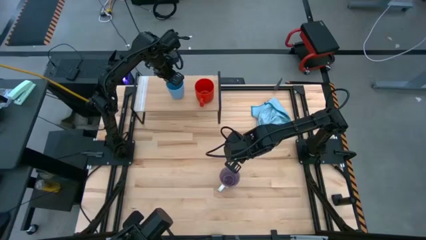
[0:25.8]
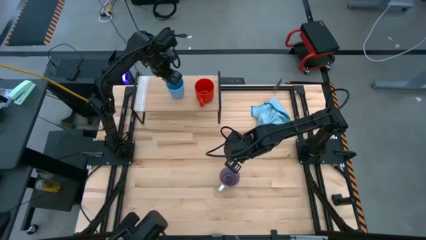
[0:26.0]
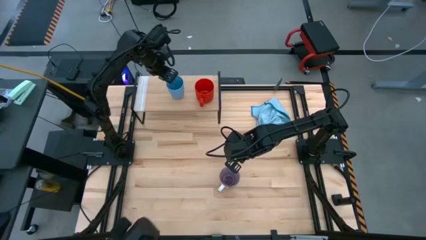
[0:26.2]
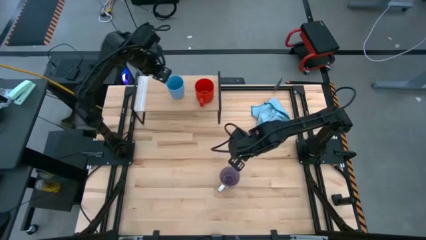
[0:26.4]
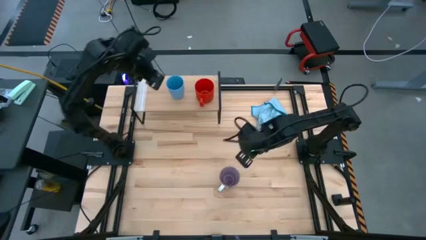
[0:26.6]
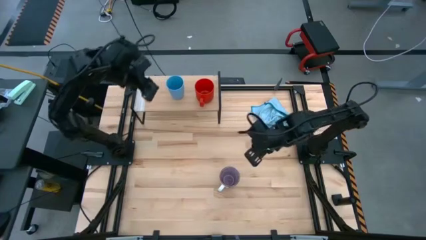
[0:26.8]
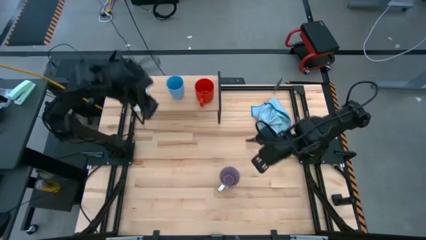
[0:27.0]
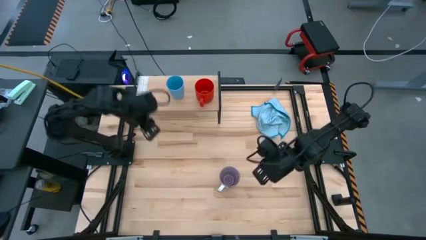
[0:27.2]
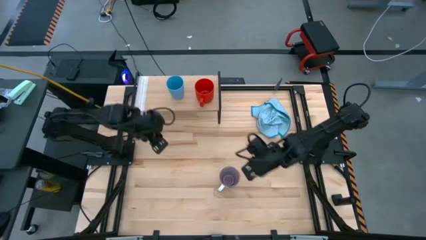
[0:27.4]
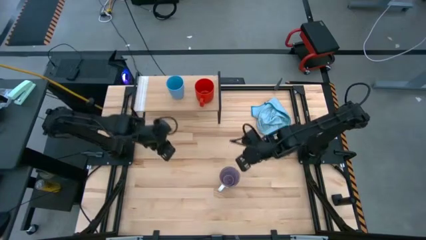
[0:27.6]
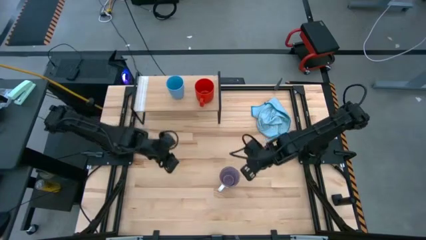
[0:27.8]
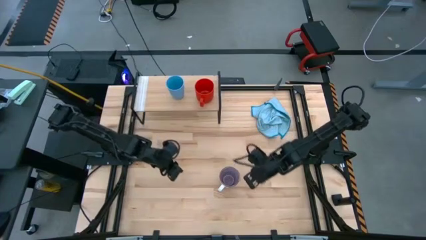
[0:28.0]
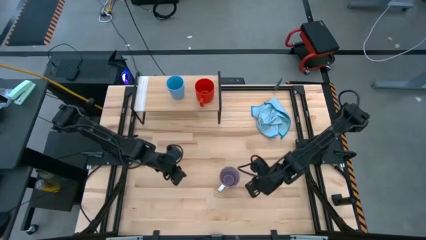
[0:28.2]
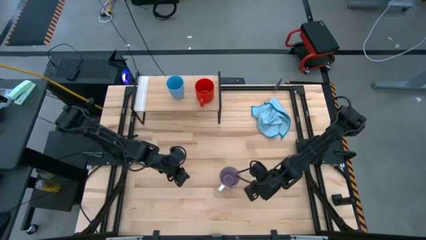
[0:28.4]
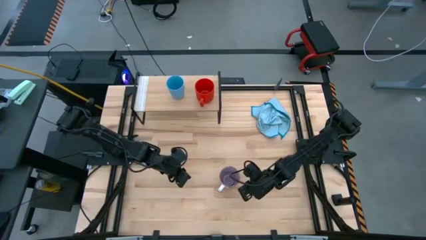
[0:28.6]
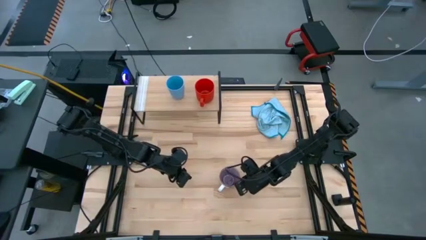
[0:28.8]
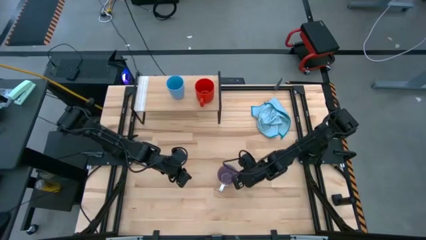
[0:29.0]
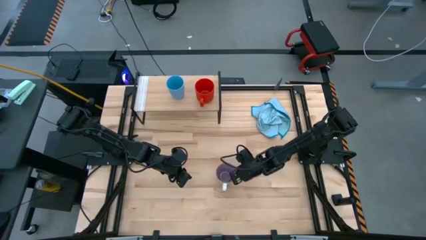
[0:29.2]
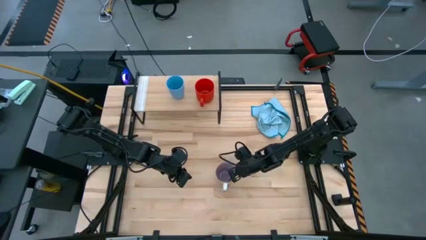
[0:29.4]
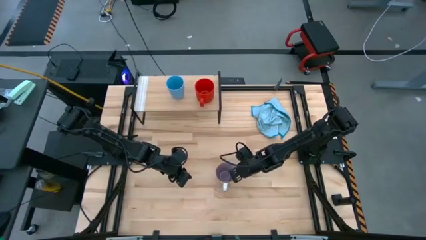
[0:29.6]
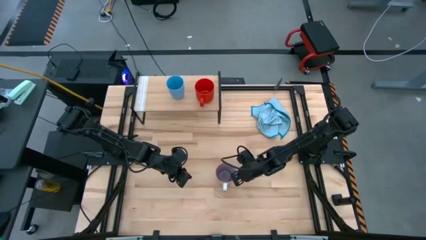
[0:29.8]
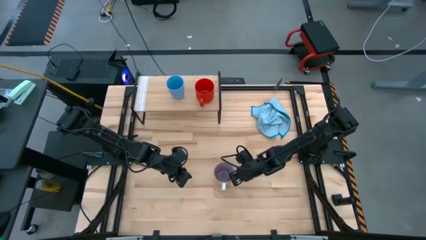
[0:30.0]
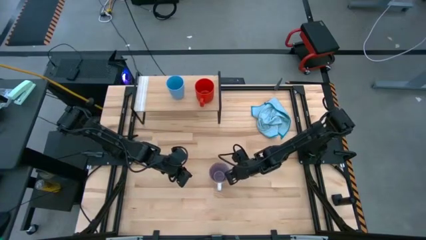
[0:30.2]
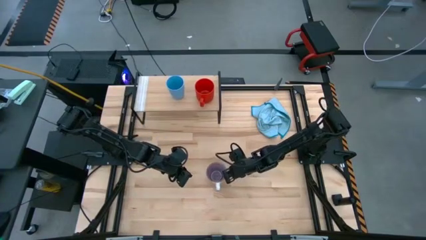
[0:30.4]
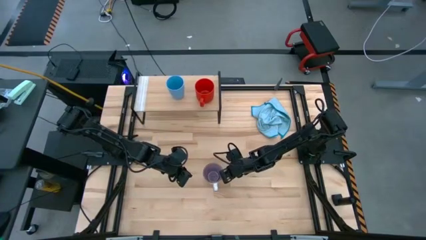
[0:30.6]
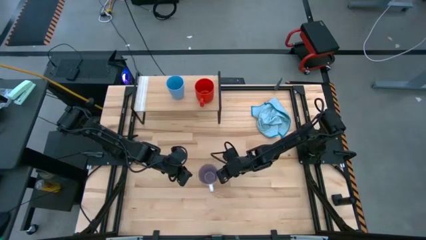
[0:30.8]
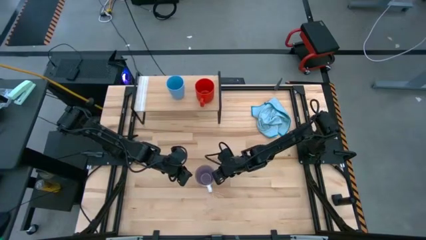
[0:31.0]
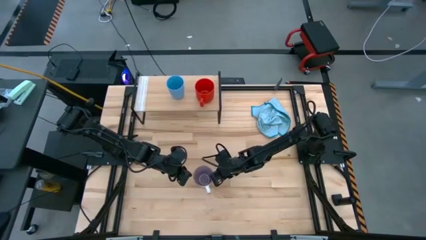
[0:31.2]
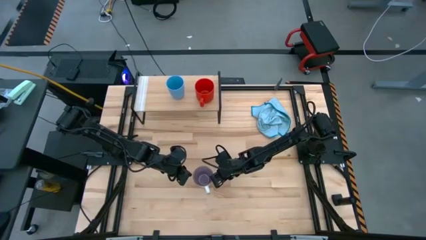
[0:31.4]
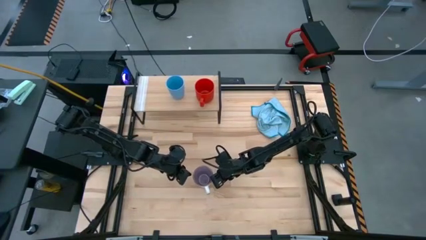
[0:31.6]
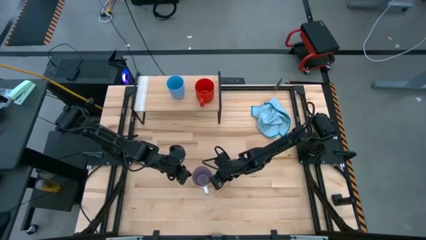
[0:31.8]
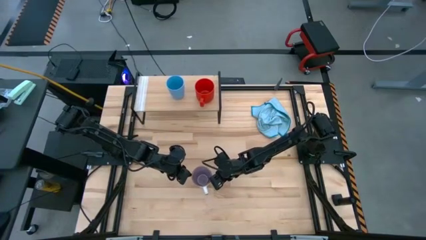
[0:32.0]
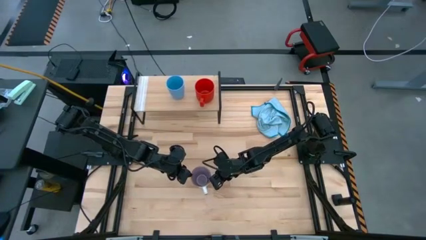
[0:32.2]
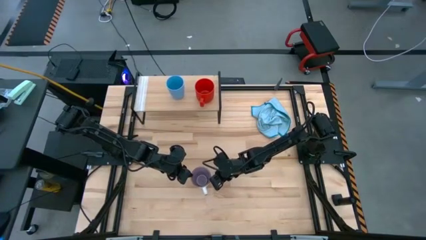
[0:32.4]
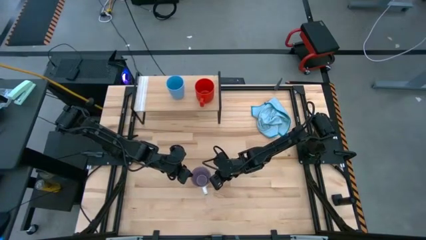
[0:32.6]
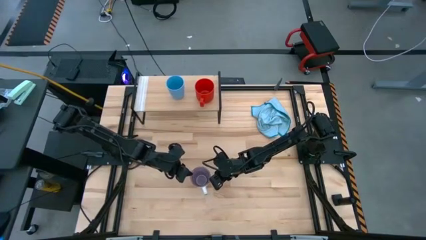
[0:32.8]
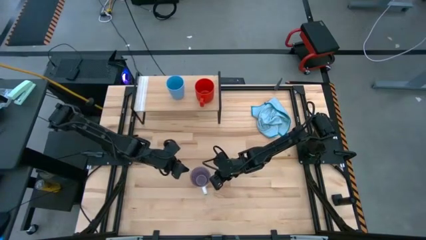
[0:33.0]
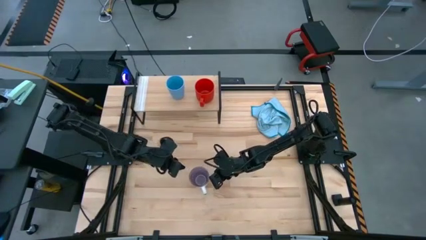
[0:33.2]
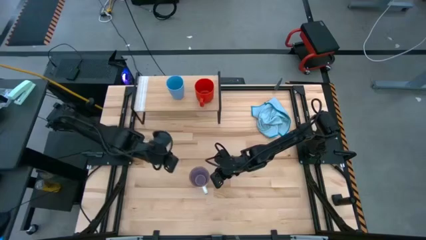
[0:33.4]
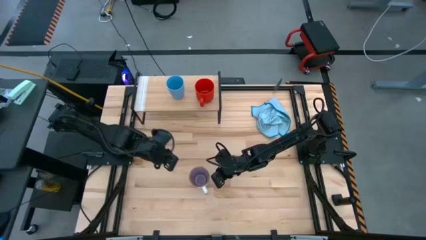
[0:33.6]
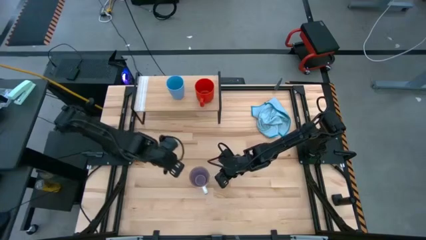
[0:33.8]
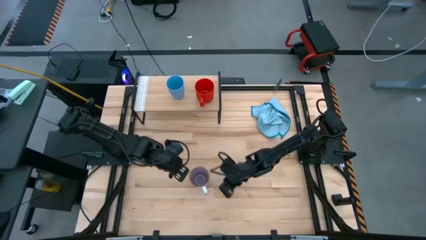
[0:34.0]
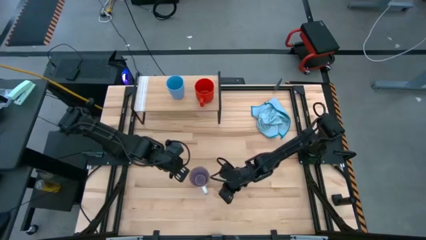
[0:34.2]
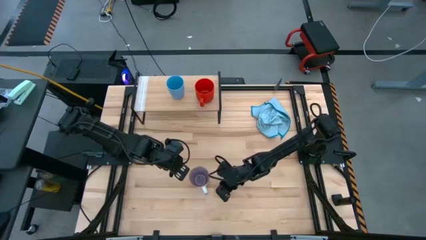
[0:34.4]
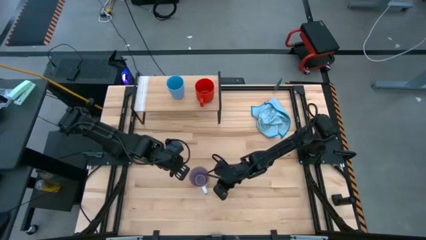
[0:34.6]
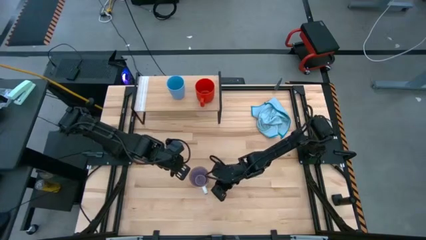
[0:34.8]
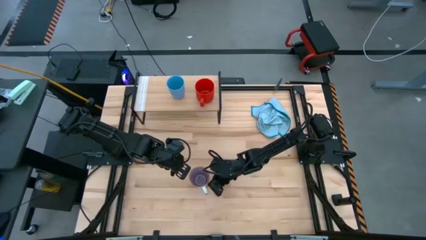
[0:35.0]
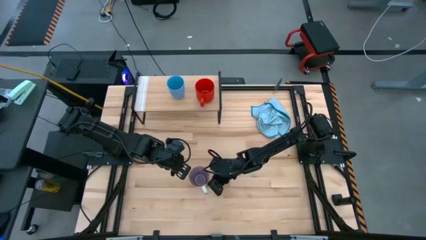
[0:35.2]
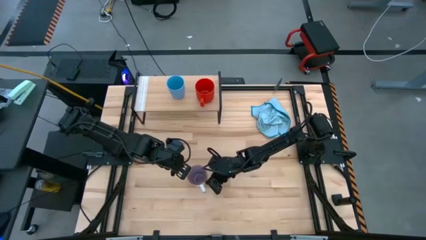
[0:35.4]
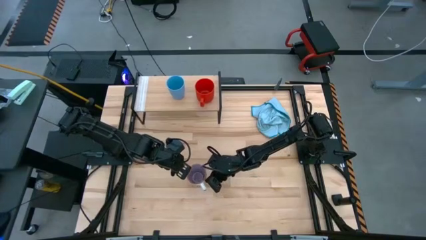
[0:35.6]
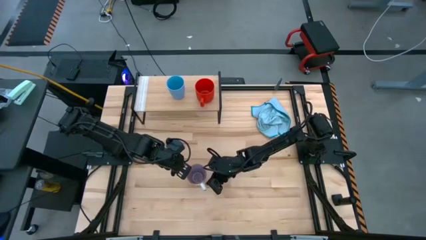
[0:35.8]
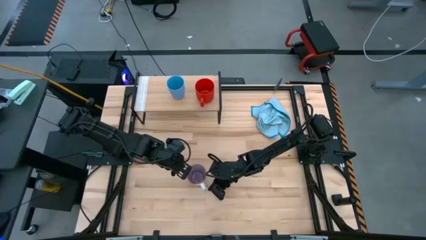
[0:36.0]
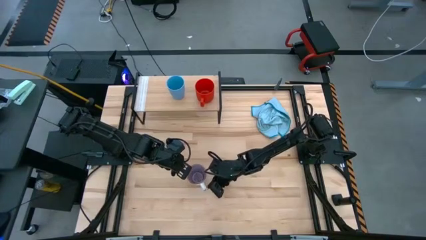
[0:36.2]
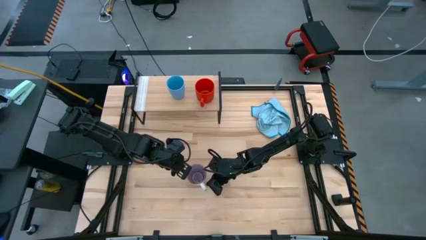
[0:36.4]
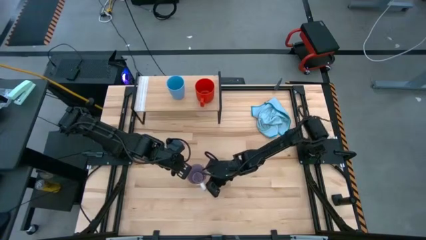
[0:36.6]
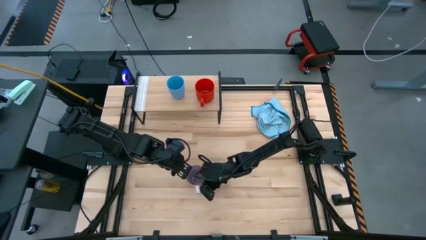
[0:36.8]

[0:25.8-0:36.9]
Task: Stack small to large cups/mugs on shelf
Put the purple cup on the shelf

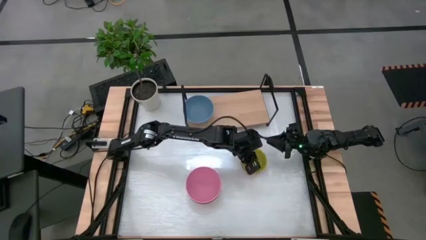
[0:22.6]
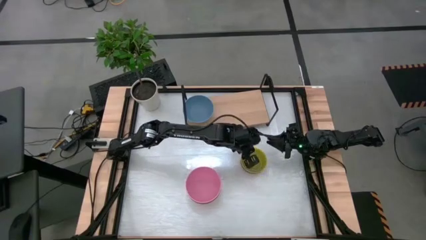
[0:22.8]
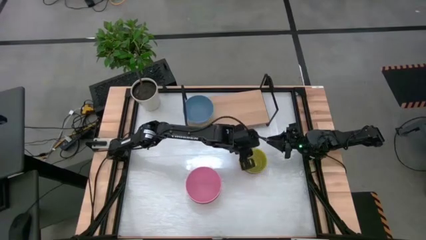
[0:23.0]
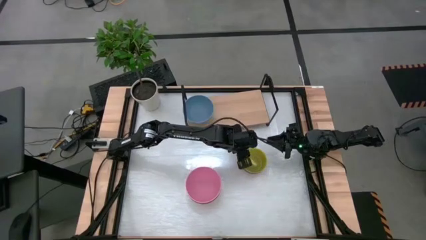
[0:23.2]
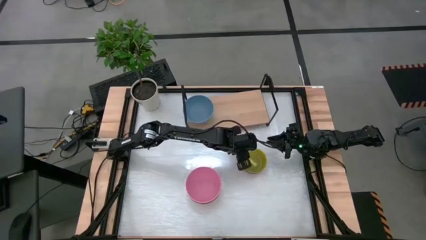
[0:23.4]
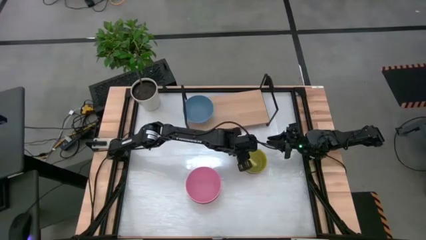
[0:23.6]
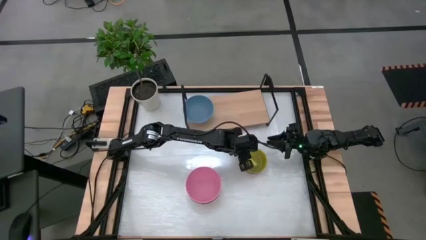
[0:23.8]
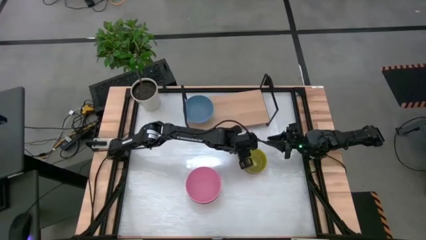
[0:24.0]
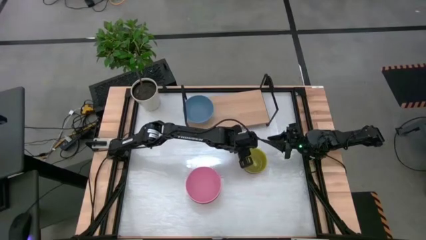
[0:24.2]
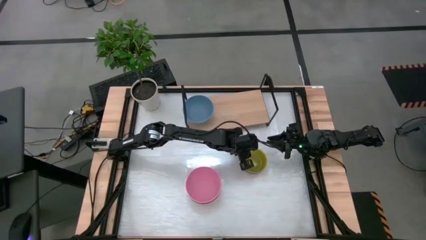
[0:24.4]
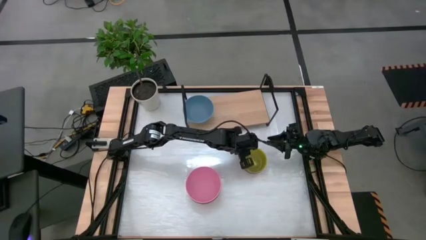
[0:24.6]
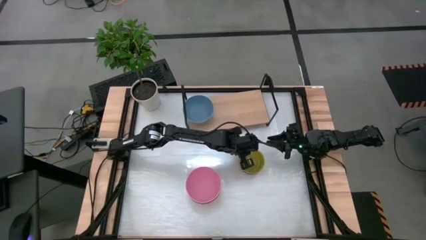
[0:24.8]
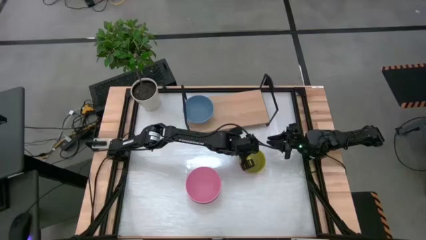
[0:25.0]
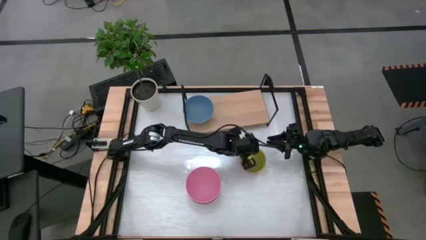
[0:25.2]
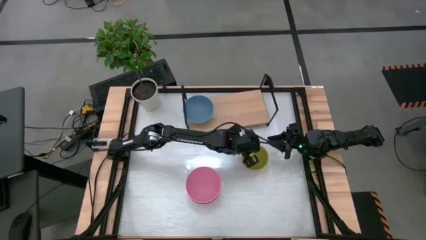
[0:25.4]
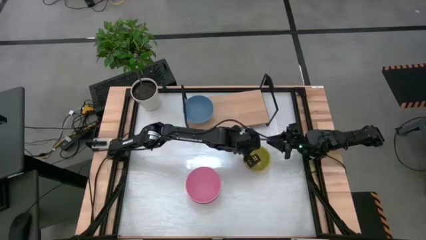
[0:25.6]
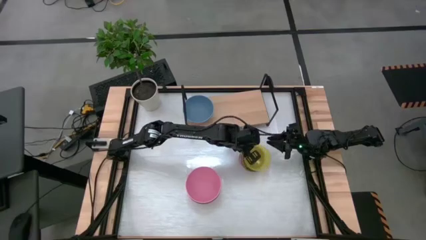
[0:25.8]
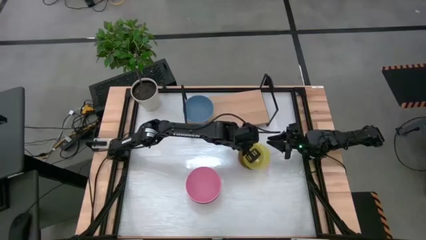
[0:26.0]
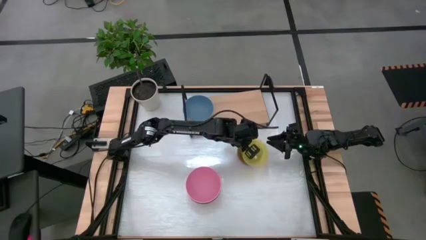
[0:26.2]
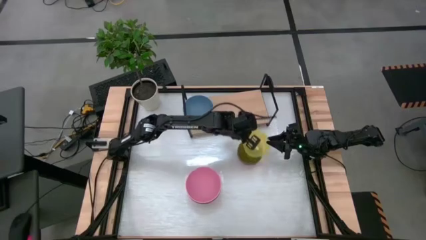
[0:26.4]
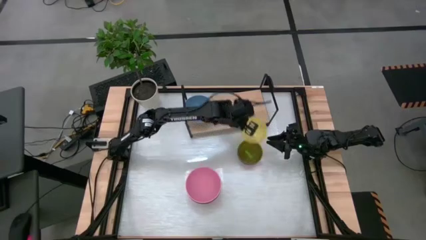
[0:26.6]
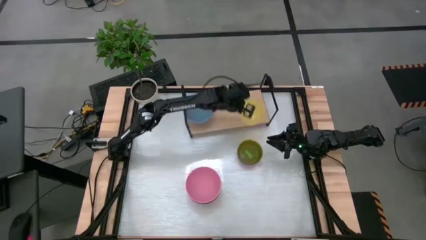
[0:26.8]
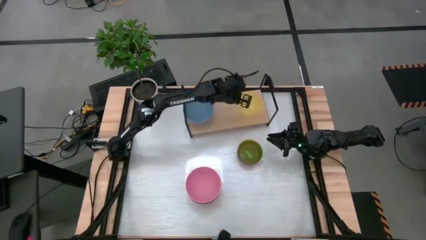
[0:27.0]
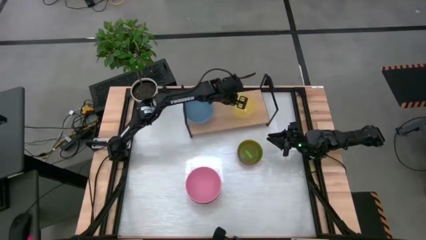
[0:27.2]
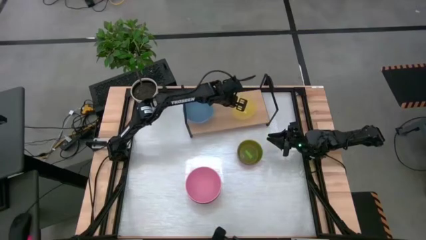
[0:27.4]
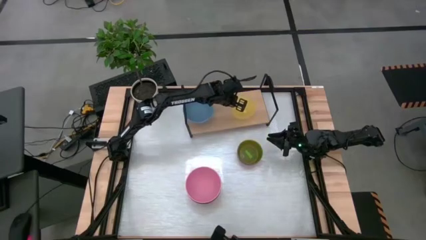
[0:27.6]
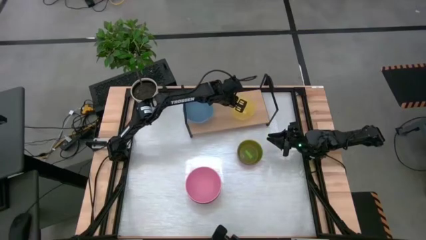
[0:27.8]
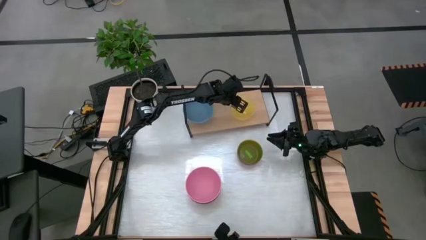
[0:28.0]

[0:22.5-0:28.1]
Task: Place and stack bowls onto a shelf
Put the small yellow bowl on the shelf
